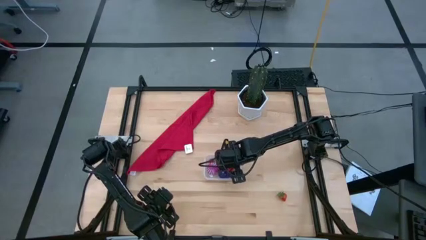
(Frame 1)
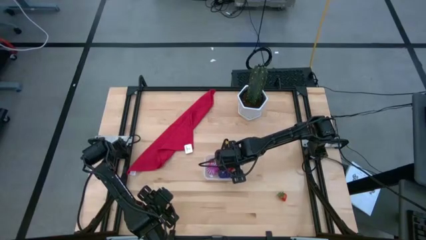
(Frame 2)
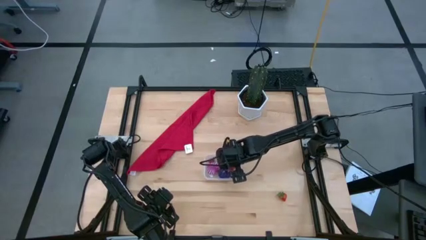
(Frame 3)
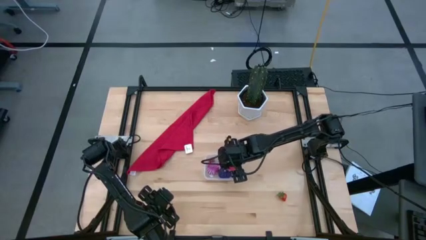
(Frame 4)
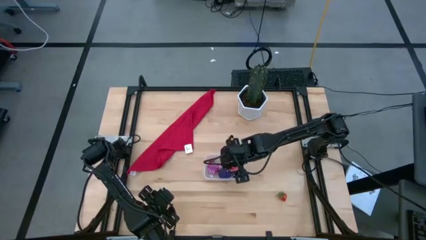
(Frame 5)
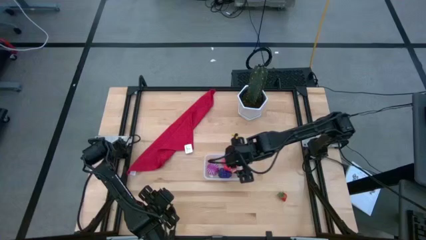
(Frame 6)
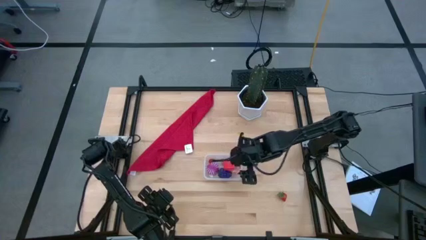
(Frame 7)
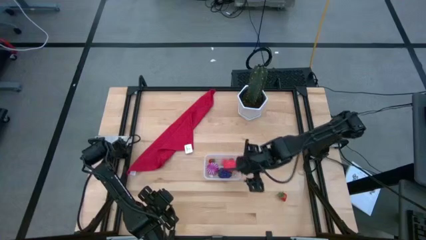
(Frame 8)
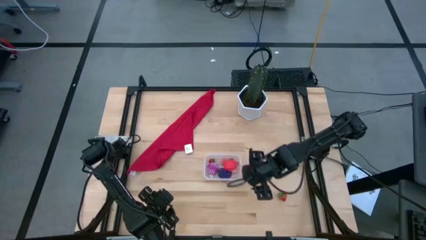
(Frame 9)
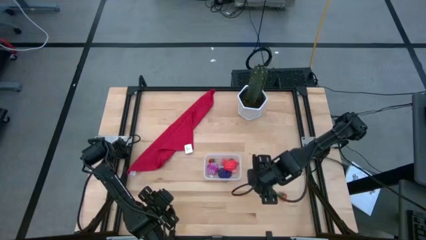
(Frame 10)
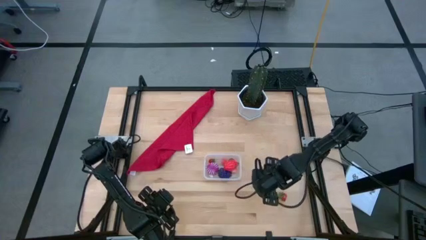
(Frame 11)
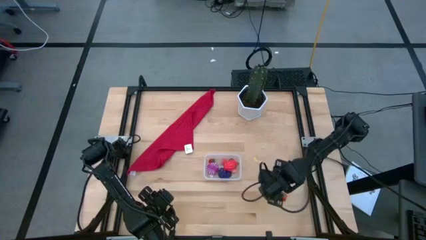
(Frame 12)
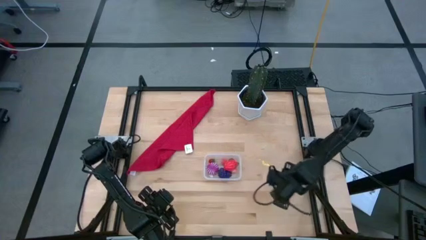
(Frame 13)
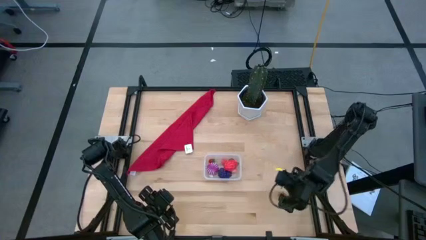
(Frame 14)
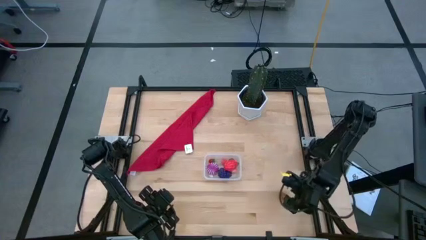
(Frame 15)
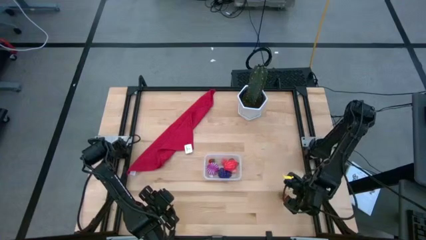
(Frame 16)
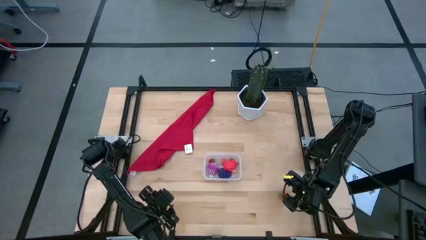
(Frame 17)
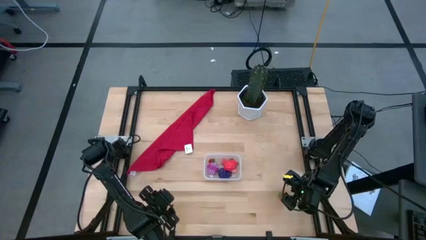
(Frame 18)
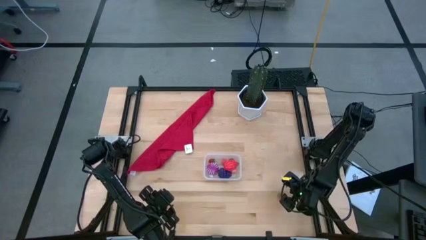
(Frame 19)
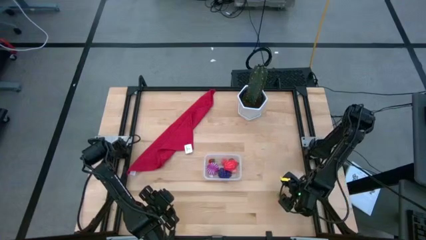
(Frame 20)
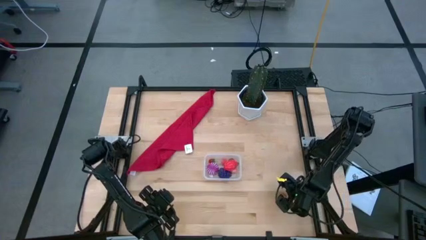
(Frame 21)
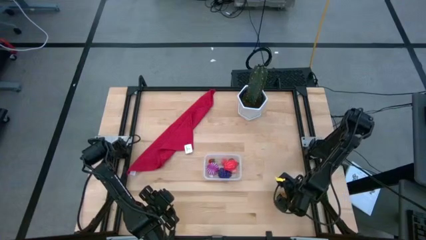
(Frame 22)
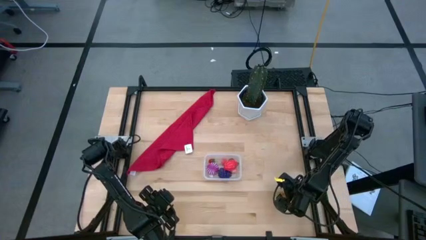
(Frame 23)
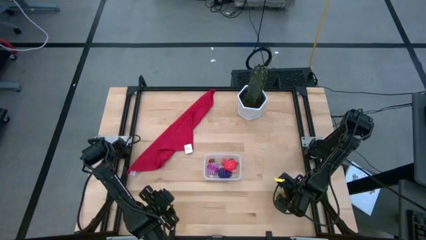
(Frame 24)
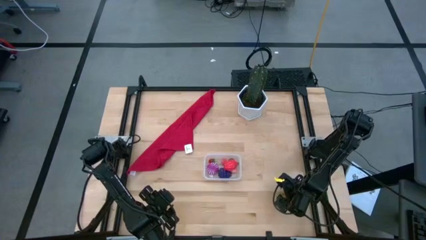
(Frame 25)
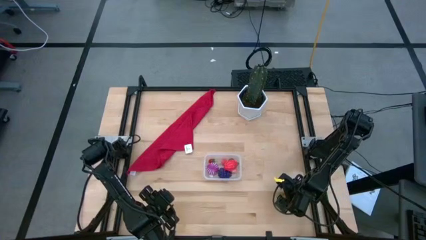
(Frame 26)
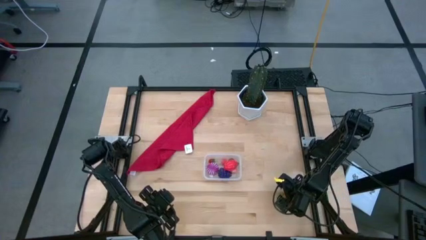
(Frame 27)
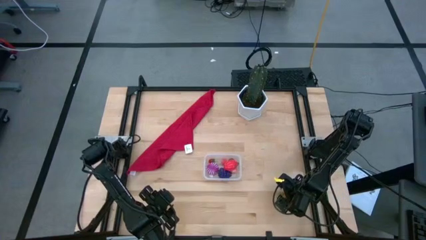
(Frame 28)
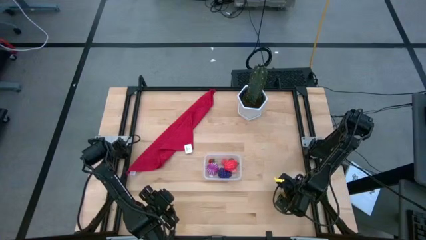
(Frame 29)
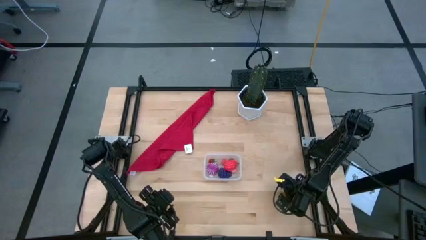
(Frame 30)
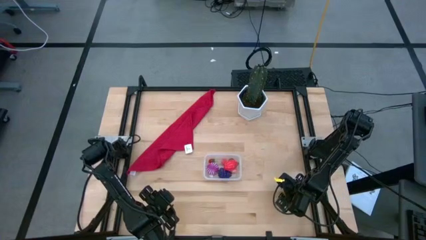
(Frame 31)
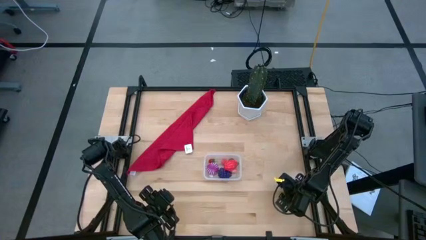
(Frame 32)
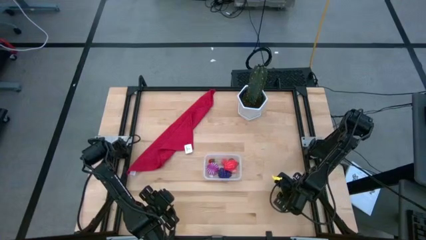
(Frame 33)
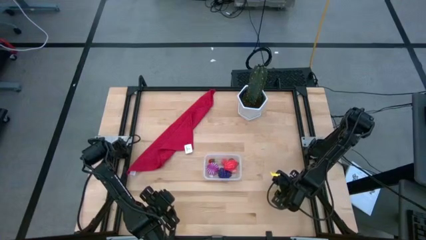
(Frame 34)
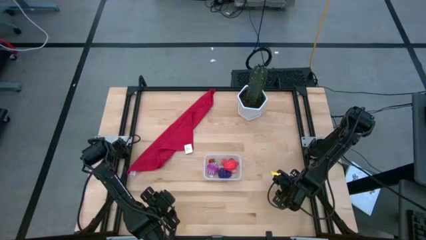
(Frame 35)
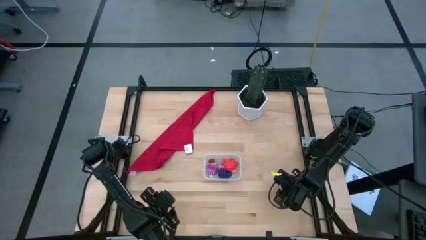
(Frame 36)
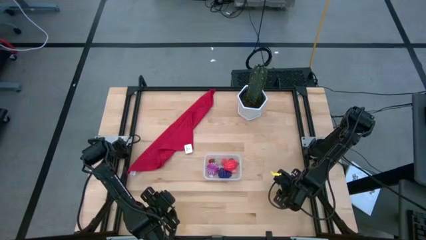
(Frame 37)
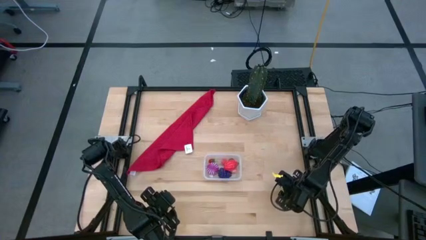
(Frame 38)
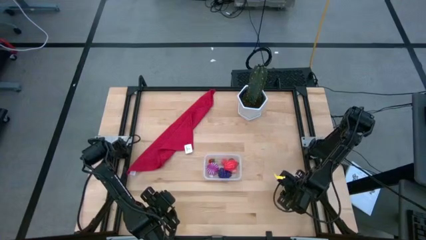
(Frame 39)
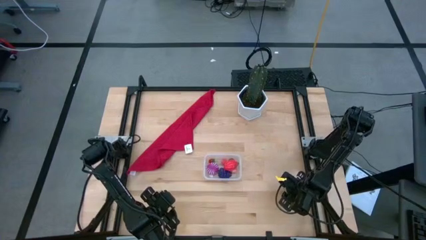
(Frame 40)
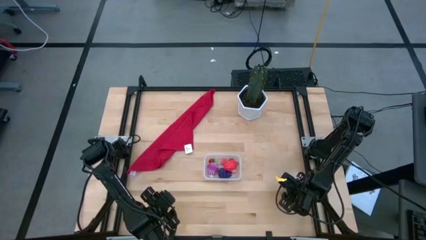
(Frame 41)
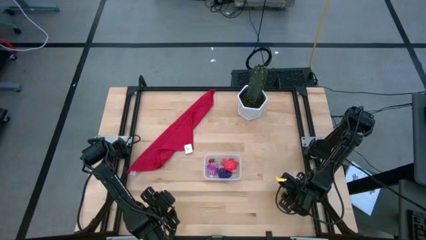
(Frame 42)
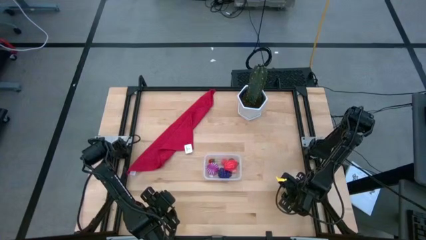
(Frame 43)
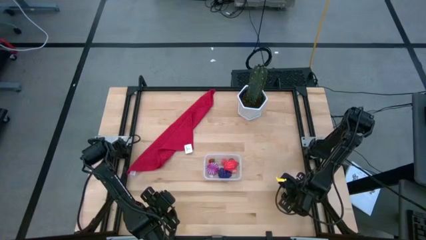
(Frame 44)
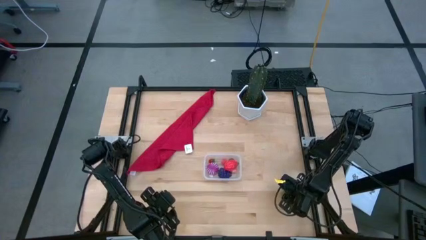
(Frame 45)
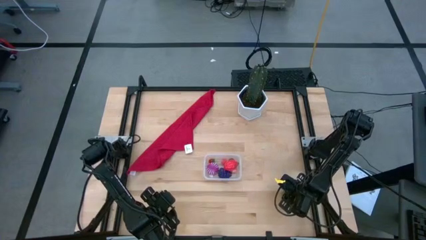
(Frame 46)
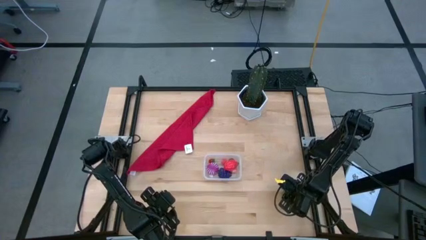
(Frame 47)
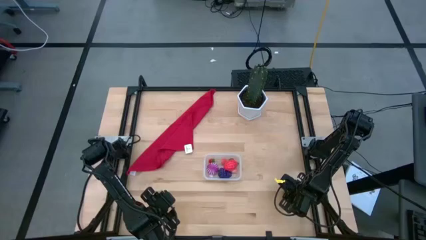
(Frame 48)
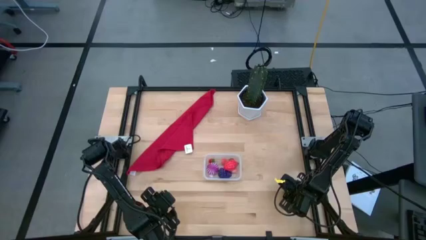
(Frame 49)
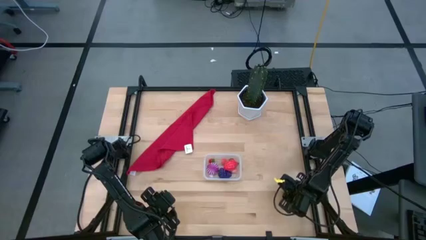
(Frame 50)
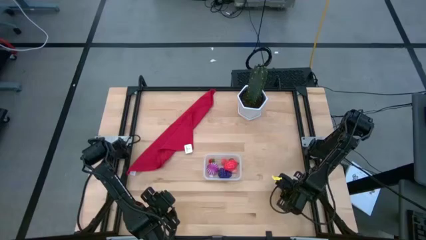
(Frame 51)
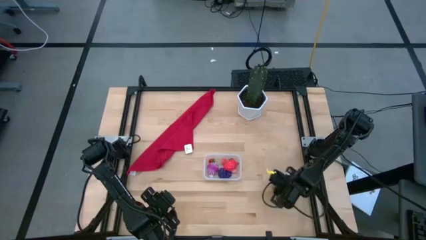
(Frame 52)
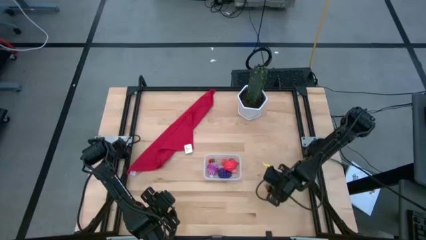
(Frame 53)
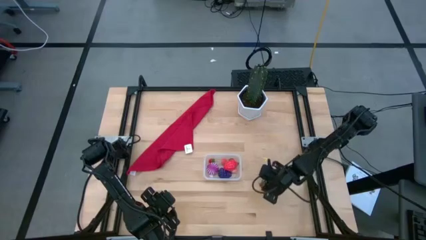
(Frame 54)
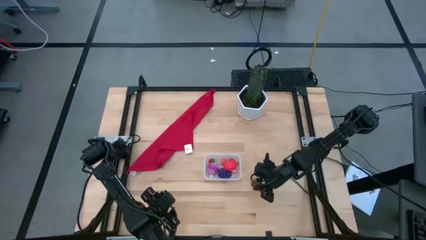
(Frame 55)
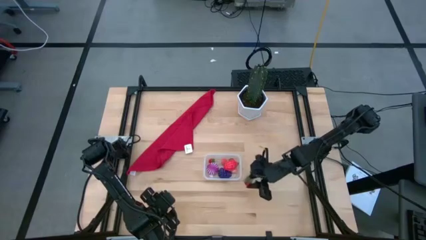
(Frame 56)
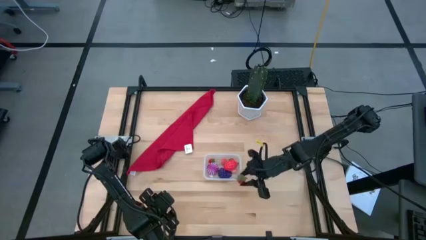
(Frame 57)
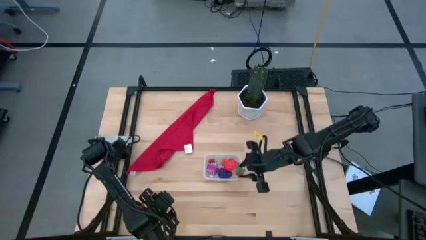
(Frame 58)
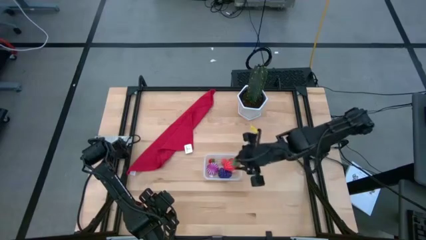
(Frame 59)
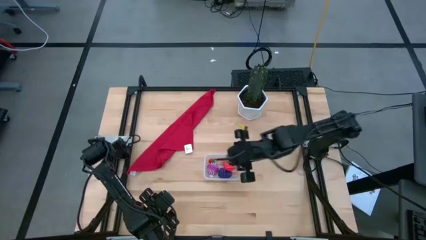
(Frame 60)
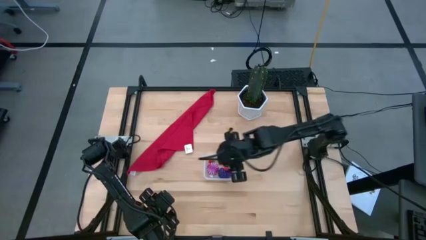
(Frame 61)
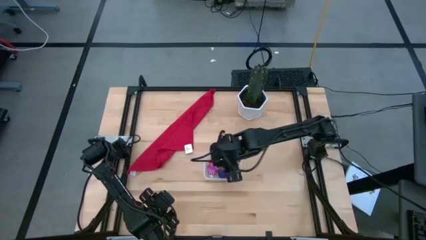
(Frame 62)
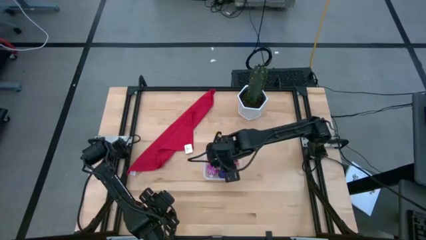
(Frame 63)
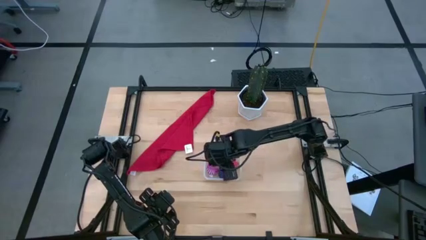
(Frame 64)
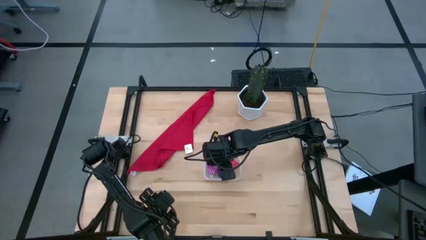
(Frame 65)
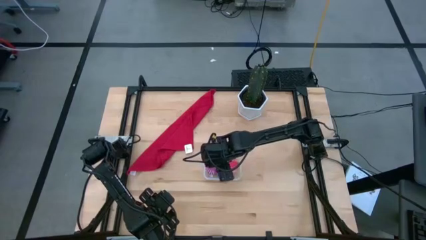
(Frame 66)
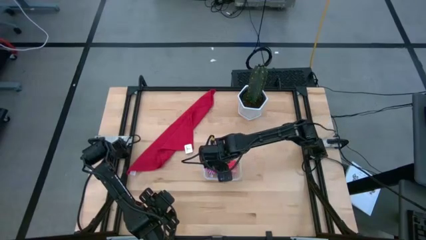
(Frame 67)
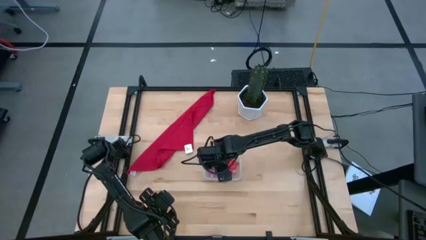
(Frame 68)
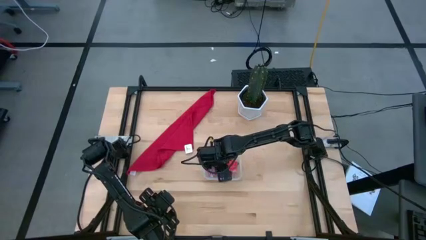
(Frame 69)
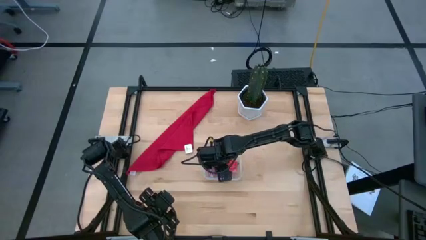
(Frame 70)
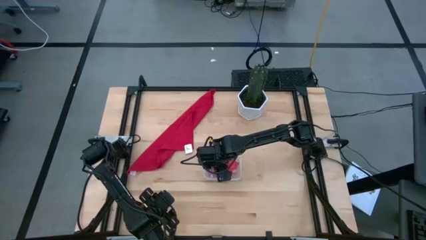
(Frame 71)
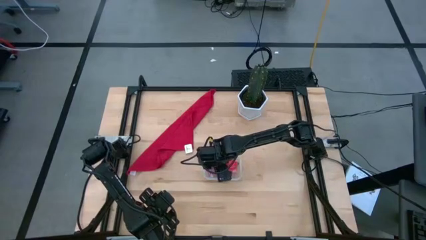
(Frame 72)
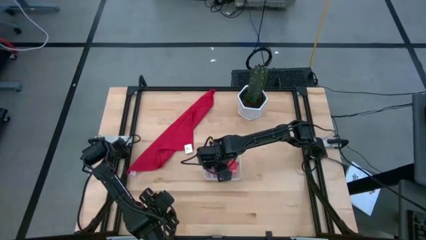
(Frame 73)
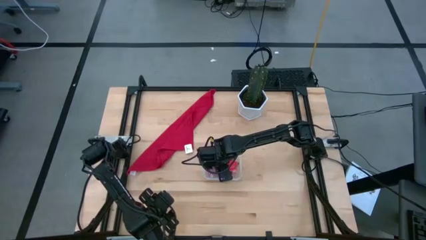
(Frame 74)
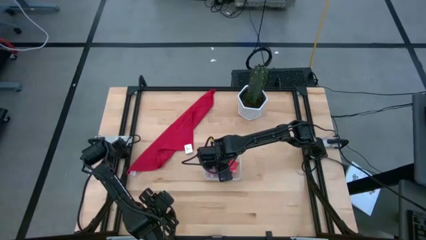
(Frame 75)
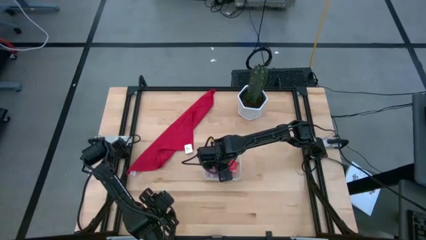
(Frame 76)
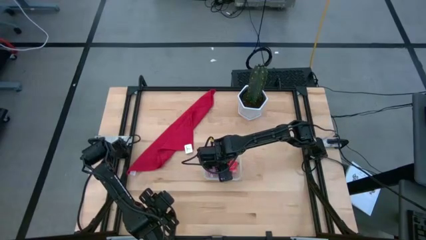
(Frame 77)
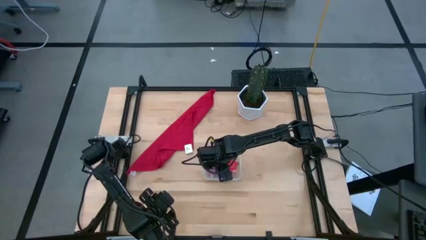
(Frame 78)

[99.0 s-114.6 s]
Task: Pick and placing Produce into tupperware
Put the red strawberry into the transparent bin
